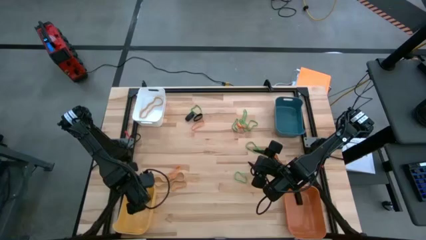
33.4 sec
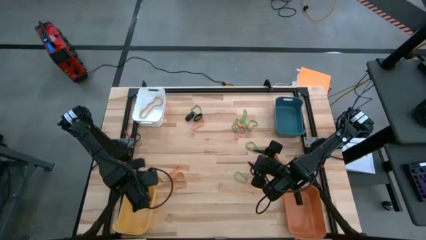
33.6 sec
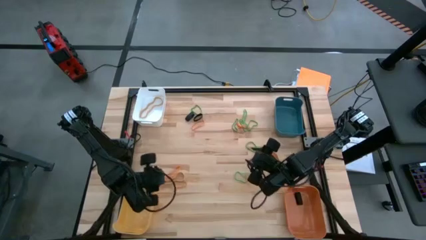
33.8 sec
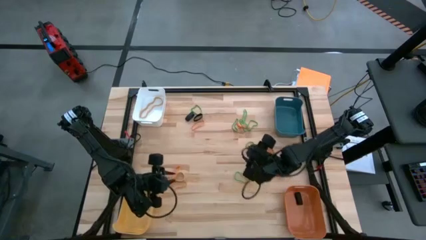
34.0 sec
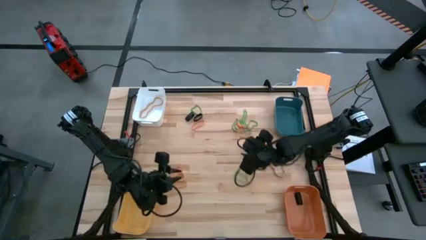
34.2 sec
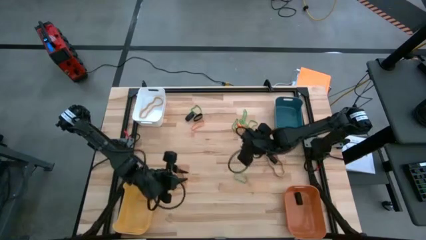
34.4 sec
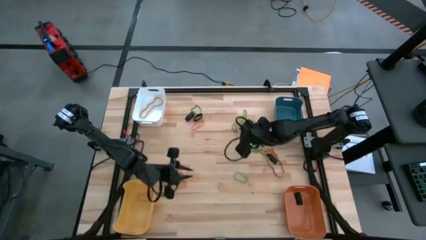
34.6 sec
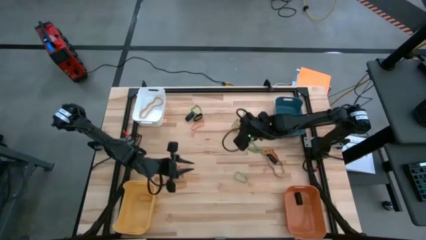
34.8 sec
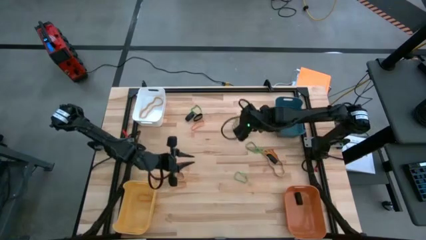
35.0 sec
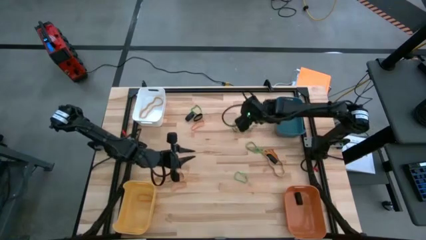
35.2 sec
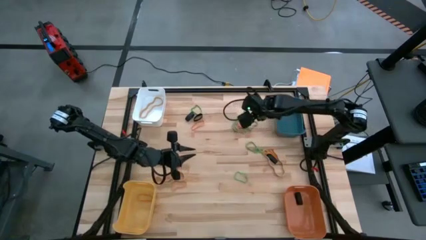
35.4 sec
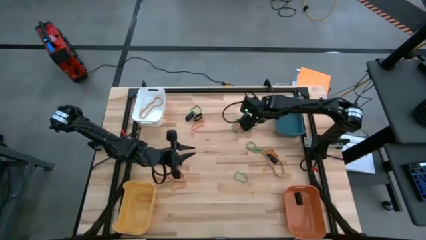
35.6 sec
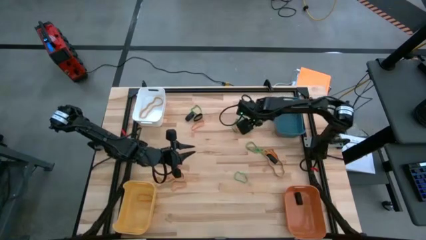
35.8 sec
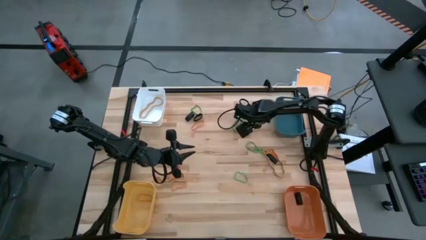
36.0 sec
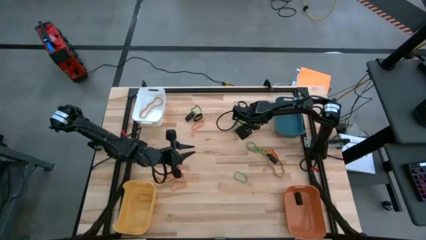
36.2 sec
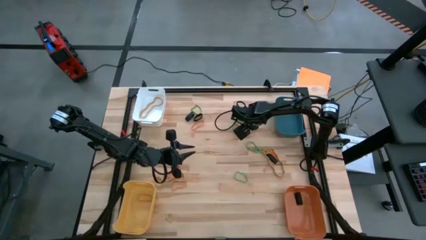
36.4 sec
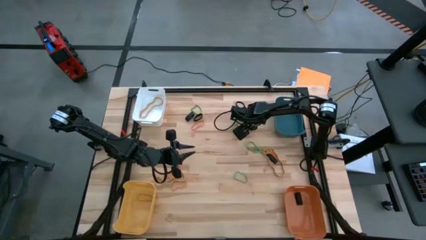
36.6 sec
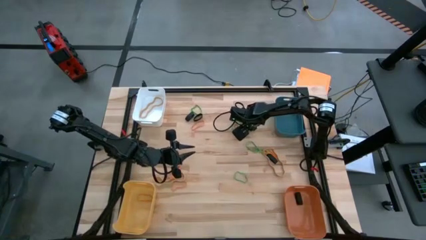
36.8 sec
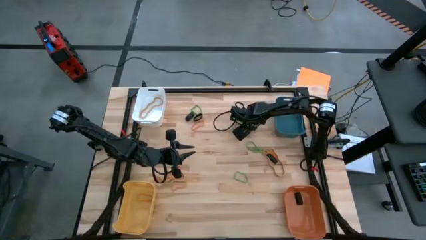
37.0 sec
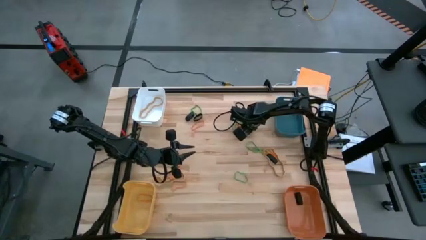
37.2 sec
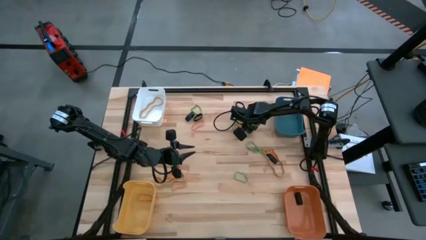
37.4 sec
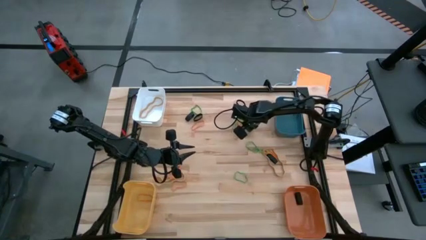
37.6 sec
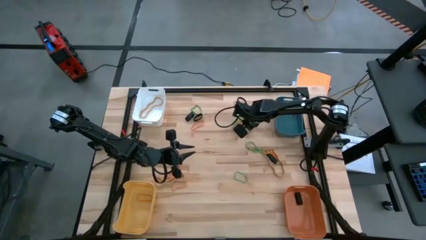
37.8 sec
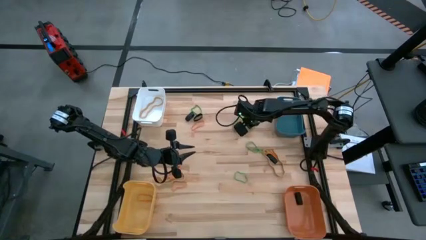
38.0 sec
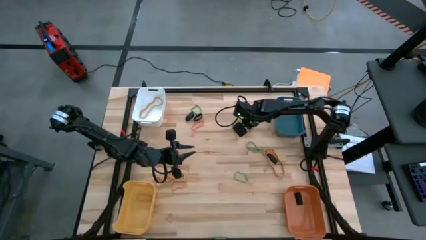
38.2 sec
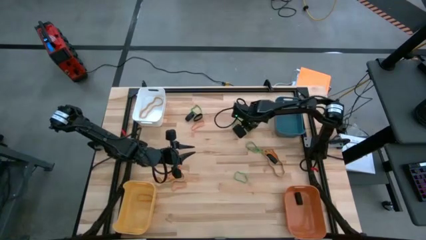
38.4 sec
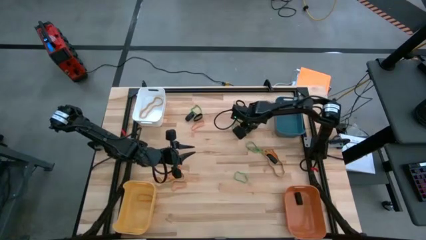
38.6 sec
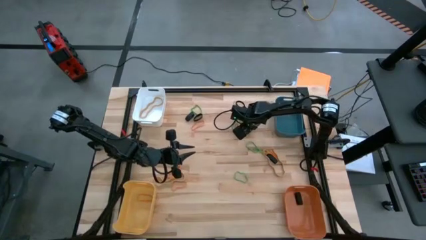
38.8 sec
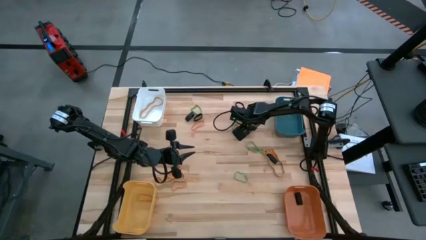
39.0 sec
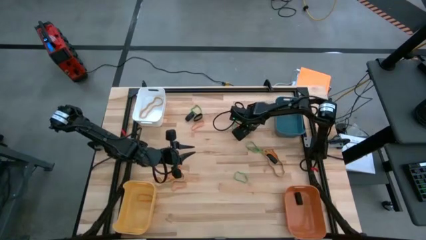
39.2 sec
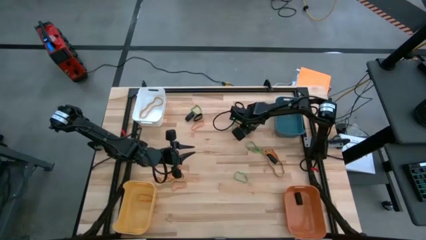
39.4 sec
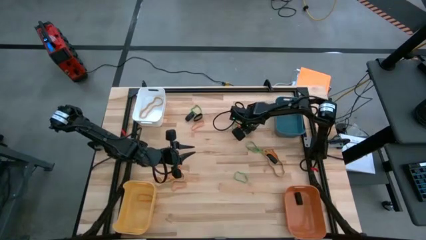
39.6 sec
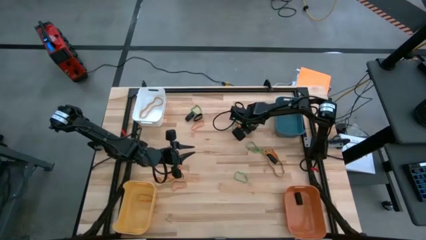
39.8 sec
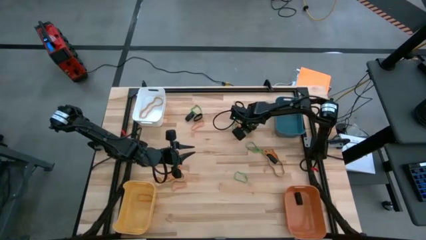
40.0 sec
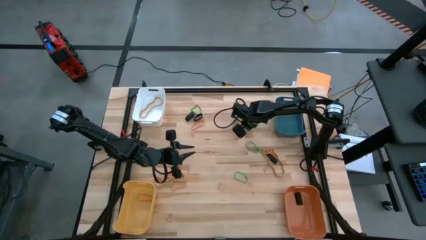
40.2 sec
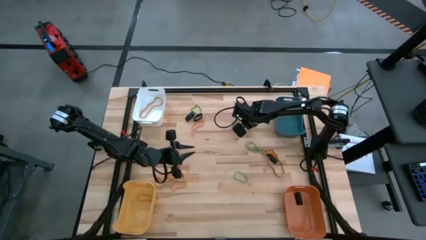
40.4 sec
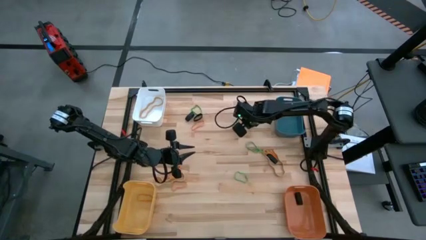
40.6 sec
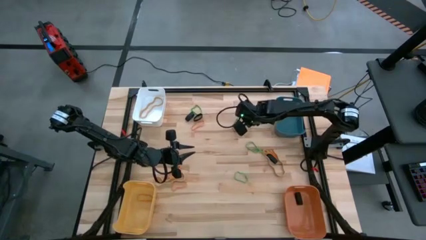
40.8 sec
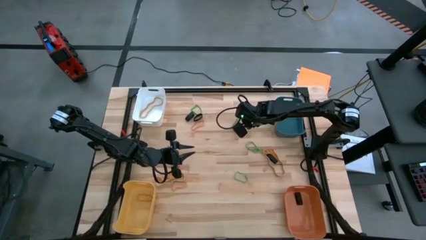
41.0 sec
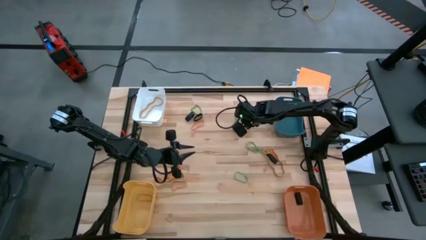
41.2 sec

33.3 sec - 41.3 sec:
Task: Sort rubber bands into baskets
Put the green rubber band into the blue bin

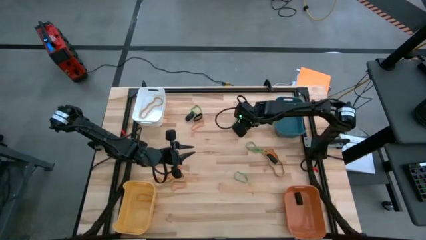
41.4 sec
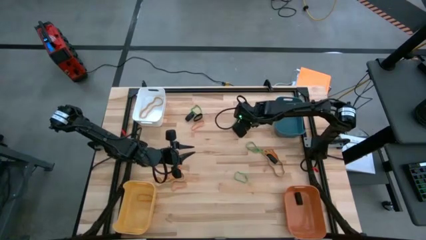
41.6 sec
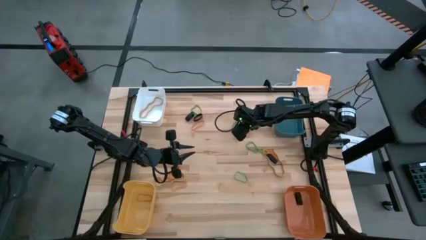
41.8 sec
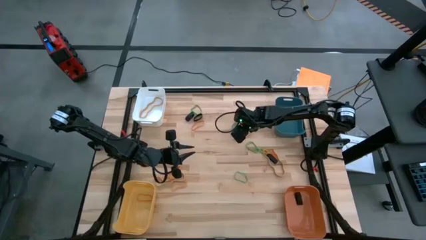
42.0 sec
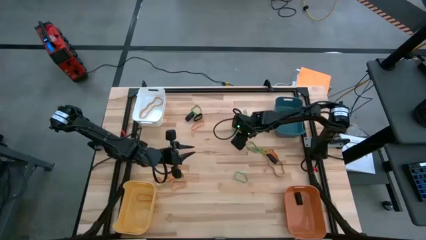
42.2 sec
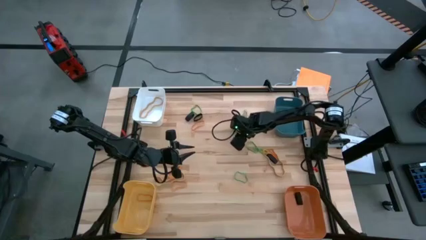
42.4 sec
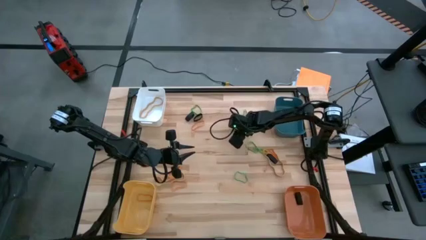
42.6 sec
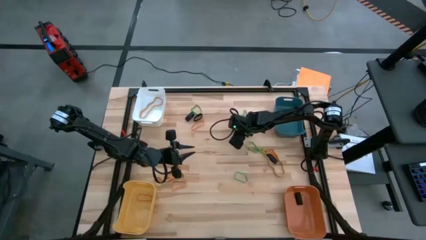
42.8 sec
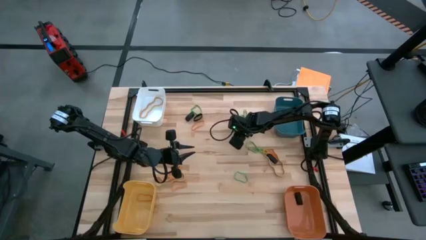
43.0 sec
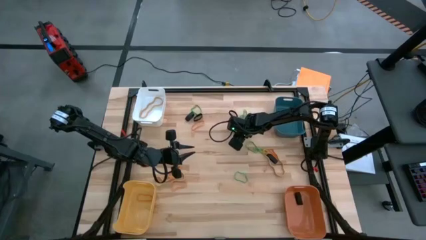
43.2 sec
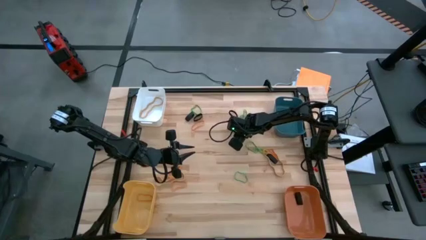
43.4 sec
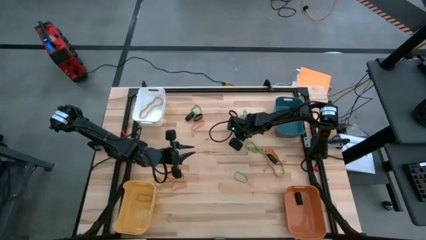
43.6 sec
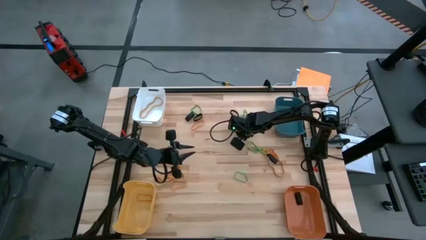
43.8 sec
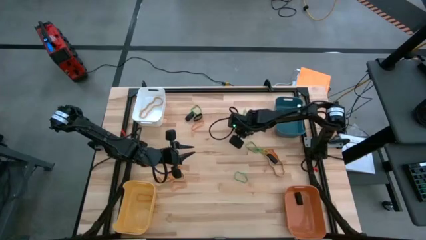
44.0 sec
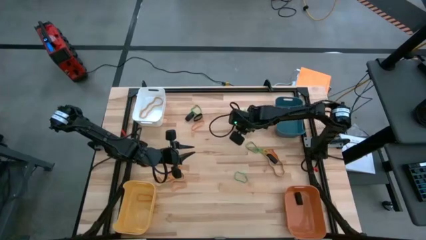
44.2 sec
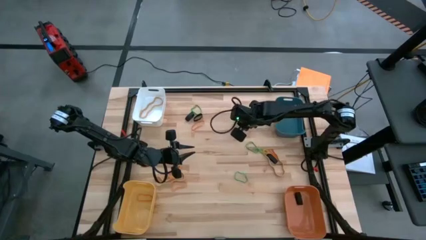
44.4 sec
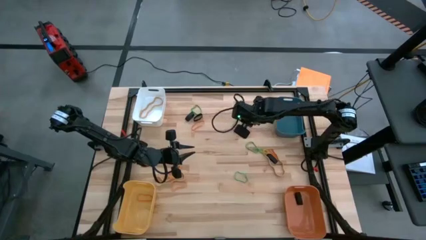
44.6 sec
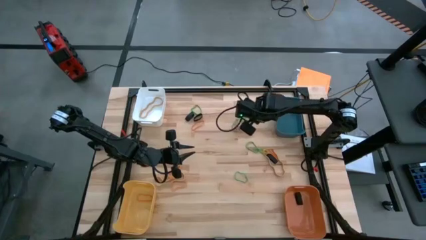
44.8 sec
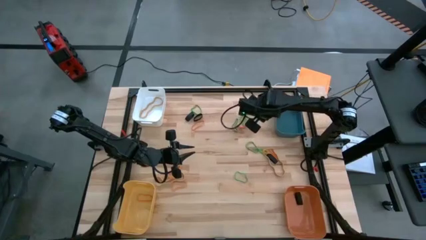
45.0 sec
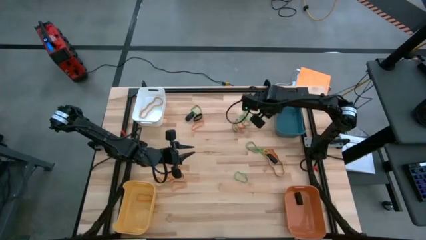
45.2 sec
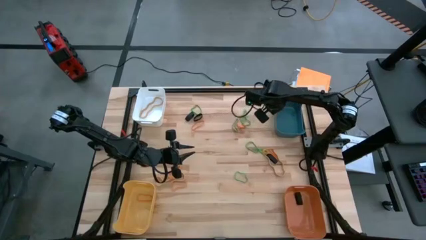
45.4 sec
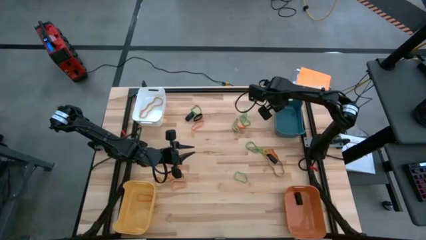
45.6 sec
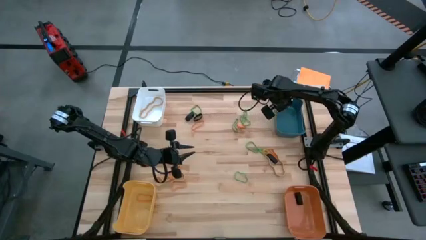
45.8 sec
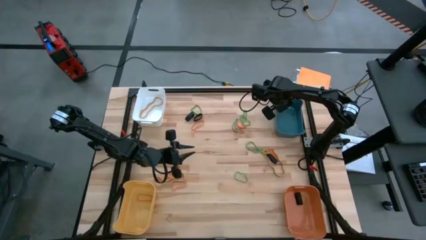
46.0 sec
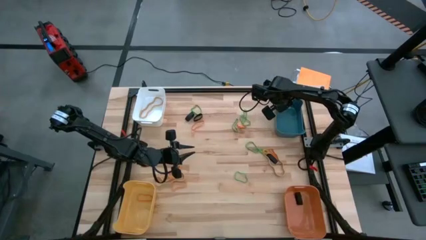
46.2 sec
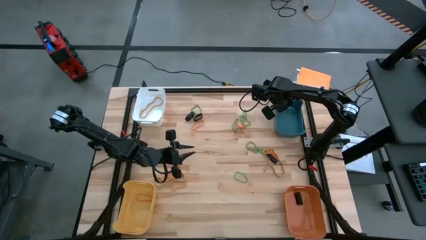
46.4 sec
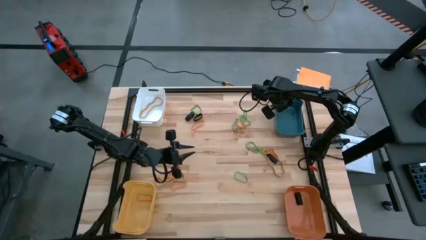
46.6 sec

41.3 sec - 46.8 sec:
Put the green rubber band into the blue bin

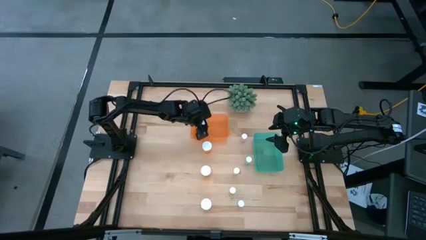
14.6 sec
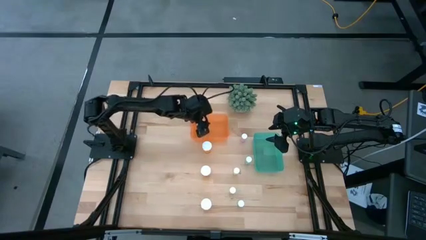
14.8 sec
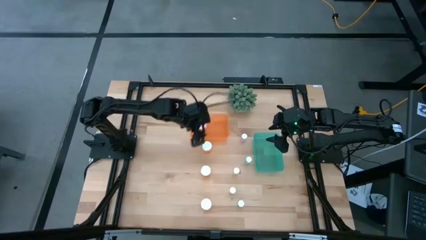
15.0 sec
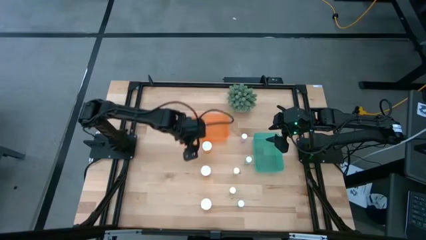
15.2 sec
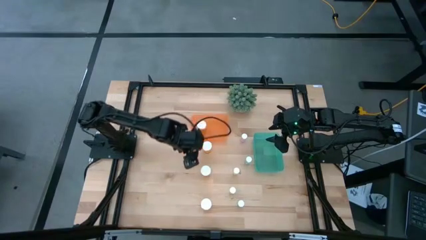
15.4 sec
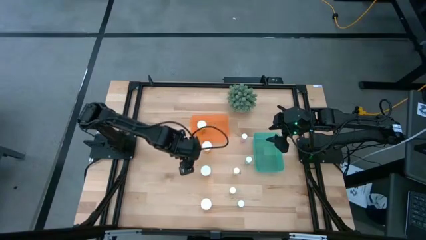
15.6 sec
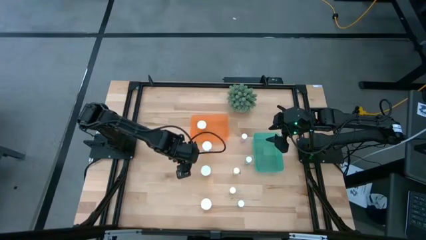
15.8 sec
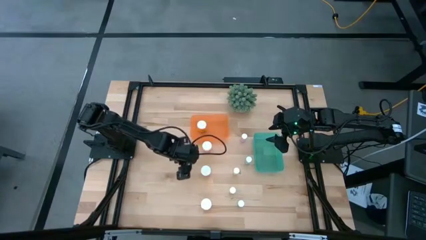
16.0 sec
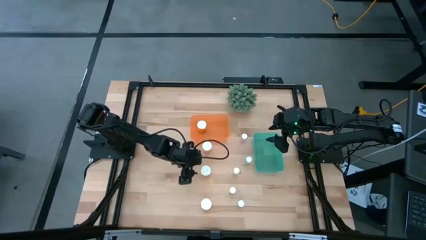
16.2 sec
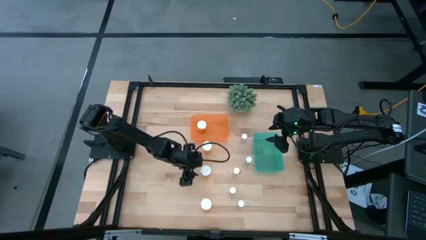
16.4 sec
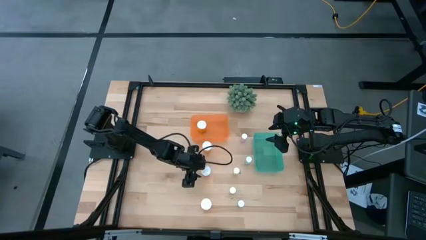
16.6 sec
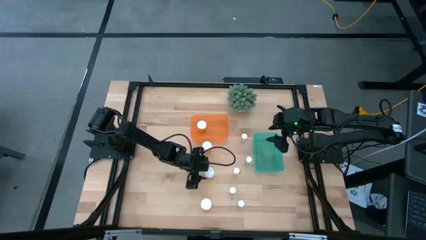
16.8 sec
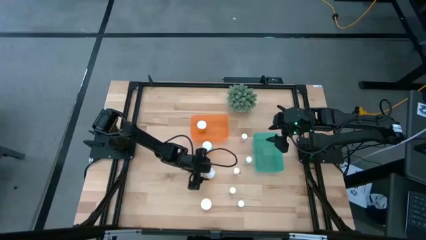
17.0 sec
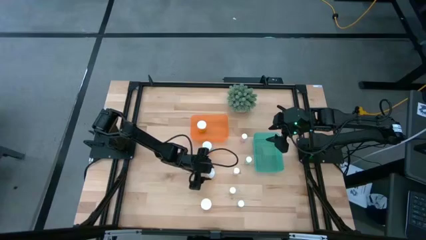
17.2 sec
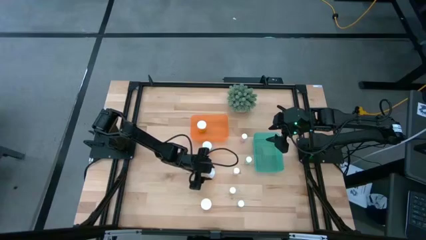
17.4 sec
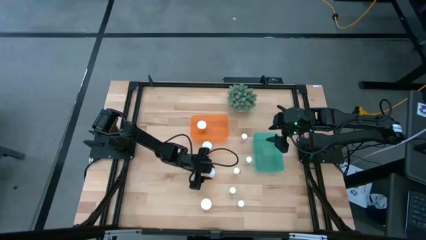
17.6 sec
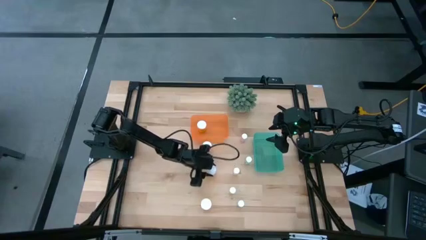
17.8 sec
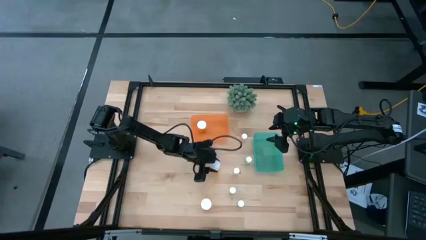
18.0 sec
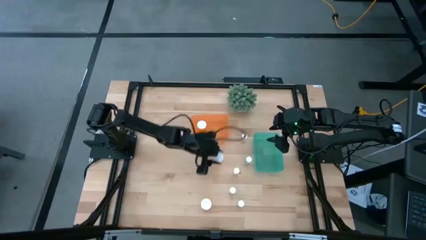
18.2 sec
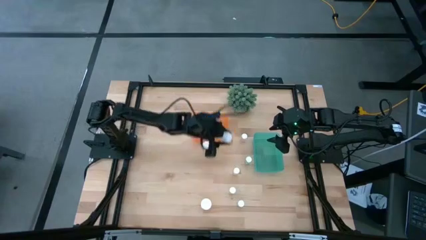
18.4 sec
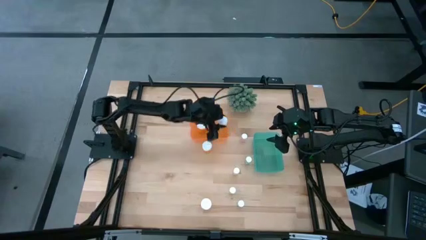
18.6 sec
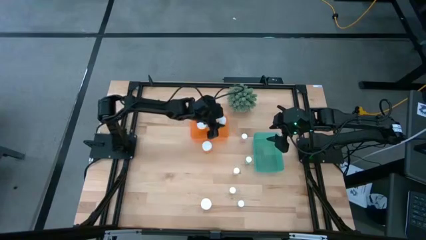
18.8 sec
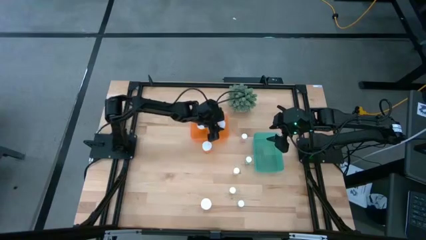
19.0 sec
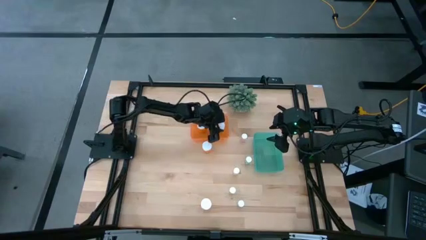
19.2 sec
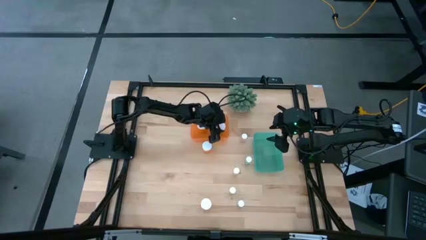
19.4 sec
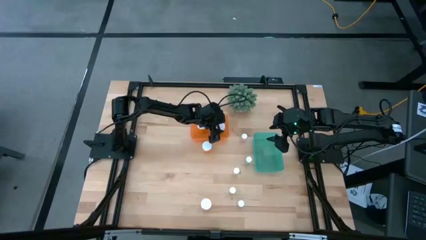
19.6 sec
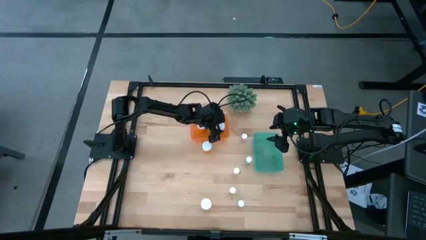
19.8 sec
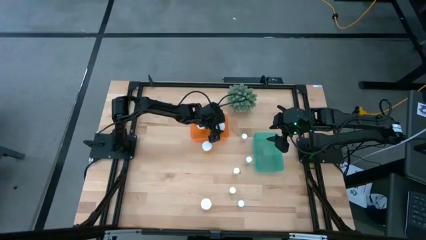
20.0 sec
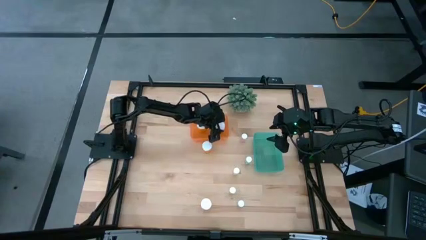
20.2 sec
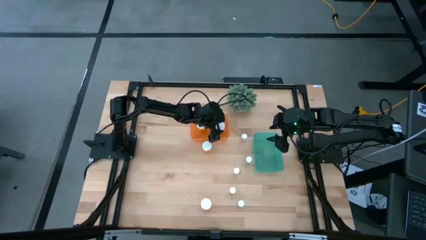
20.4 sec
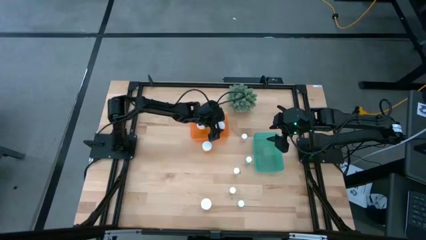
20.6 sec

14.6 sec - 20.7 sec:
Task: Pick and place medicine bottles into bin by pill shape (circle, oval)
Put the orange pill bottle into the orange bin
